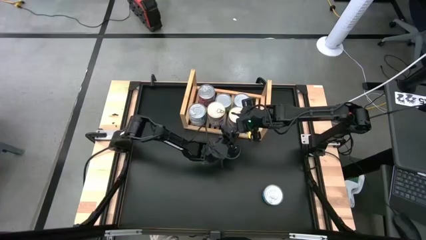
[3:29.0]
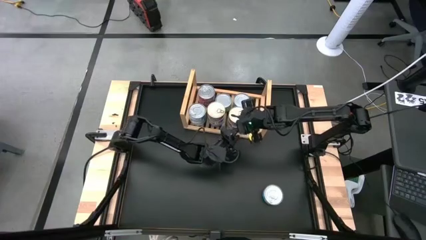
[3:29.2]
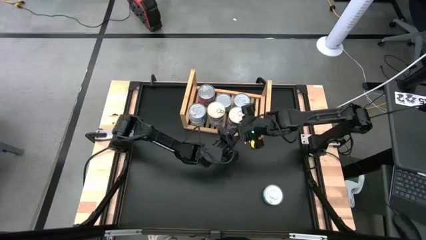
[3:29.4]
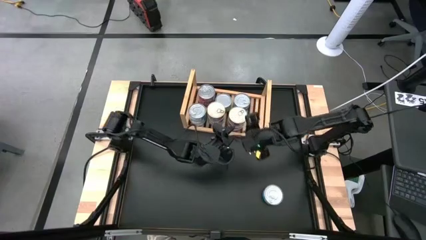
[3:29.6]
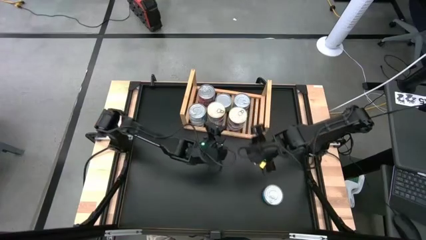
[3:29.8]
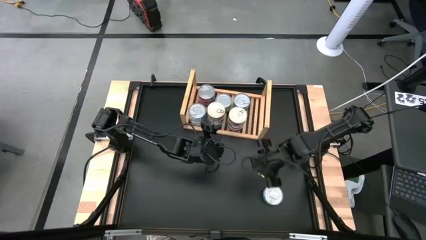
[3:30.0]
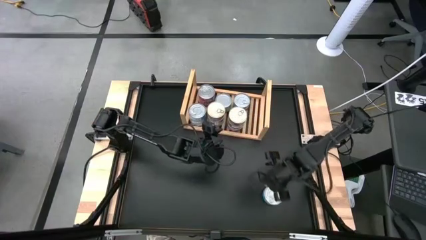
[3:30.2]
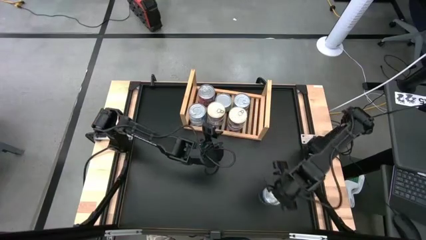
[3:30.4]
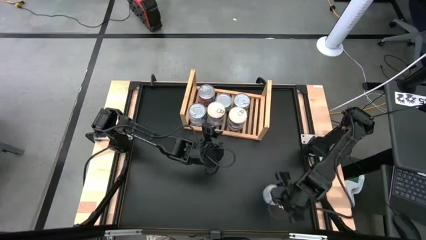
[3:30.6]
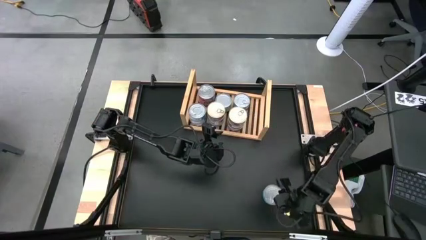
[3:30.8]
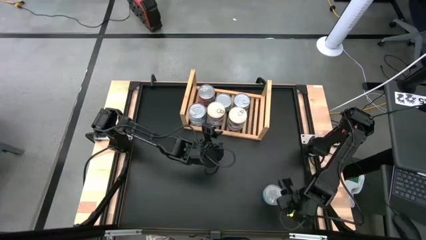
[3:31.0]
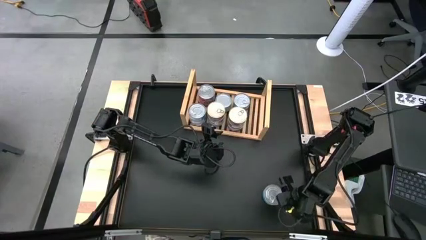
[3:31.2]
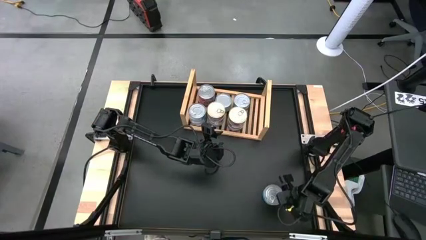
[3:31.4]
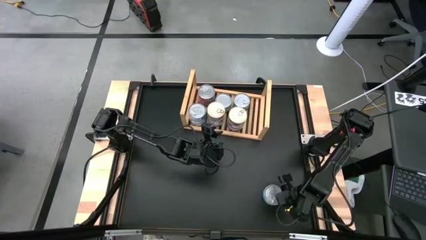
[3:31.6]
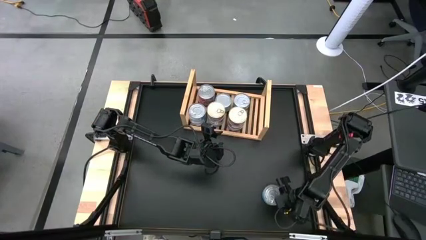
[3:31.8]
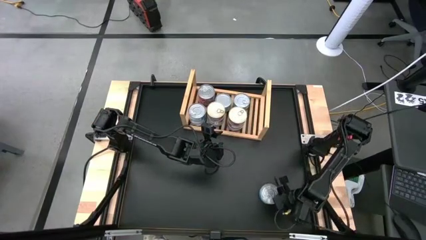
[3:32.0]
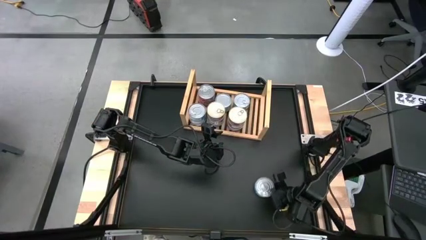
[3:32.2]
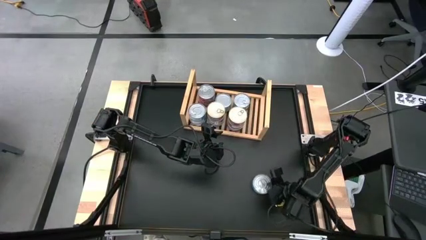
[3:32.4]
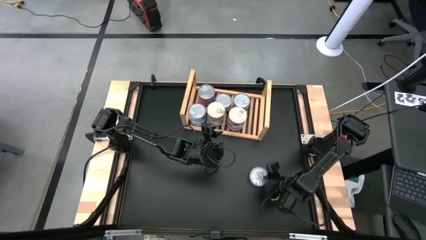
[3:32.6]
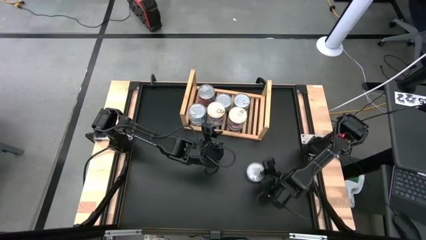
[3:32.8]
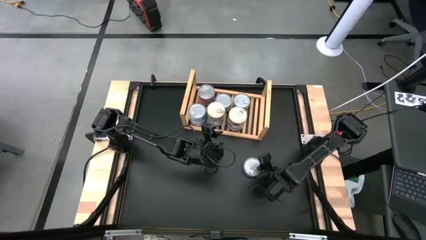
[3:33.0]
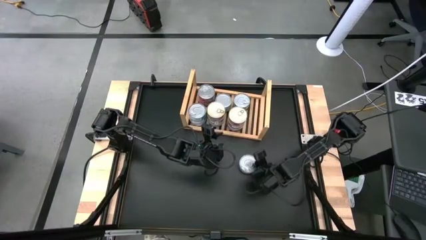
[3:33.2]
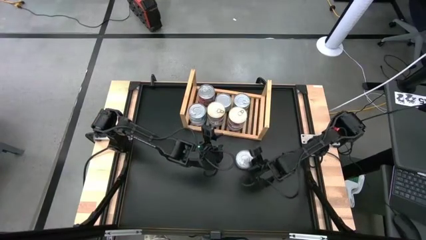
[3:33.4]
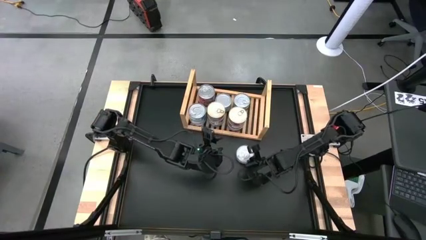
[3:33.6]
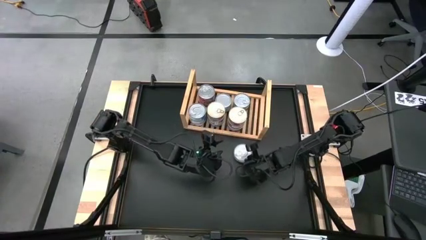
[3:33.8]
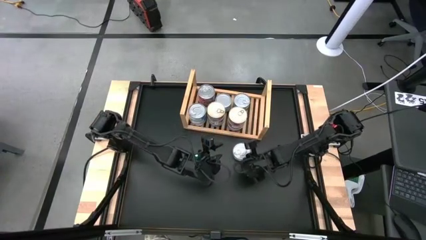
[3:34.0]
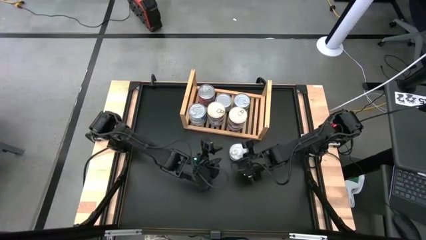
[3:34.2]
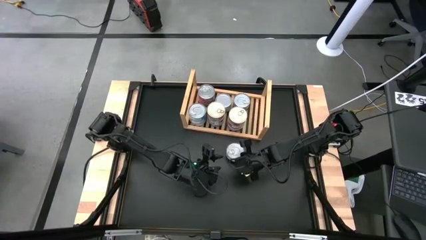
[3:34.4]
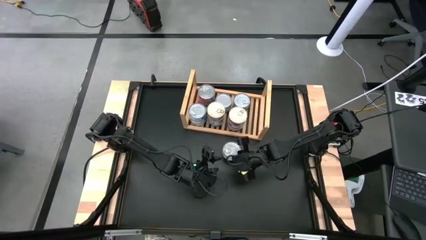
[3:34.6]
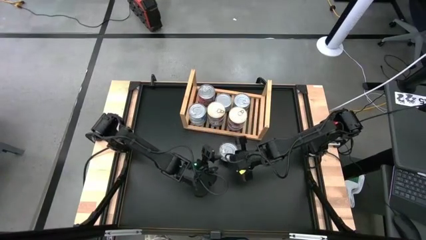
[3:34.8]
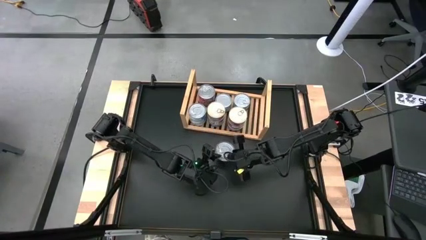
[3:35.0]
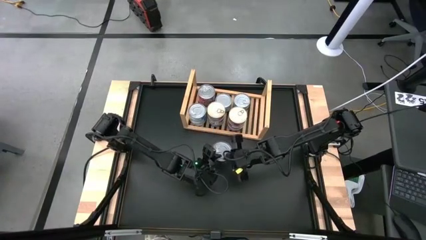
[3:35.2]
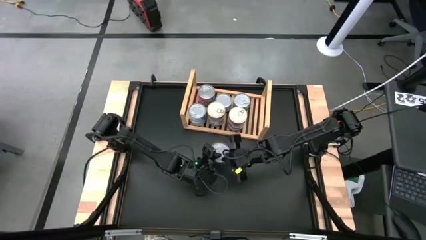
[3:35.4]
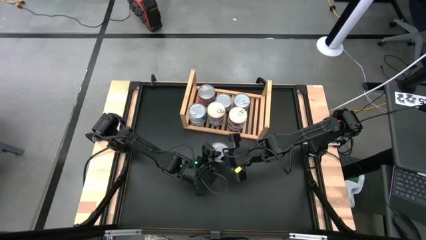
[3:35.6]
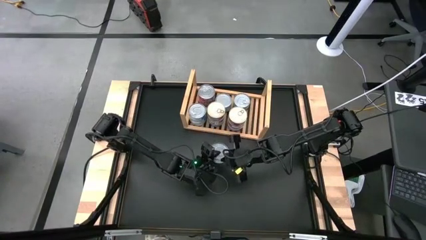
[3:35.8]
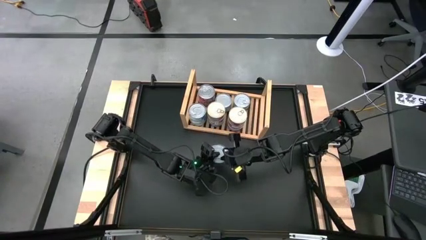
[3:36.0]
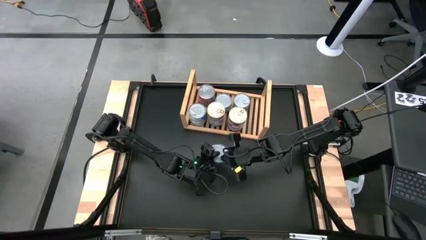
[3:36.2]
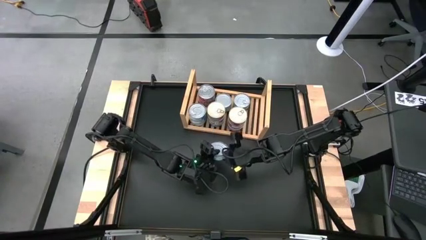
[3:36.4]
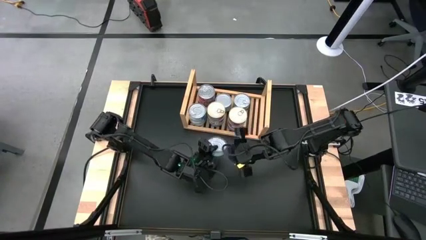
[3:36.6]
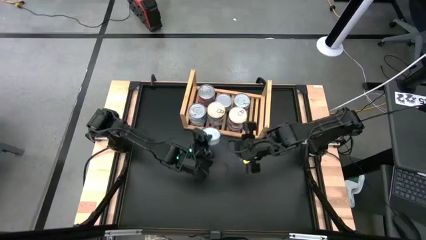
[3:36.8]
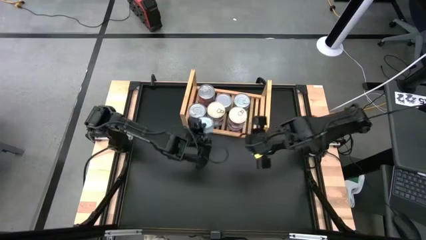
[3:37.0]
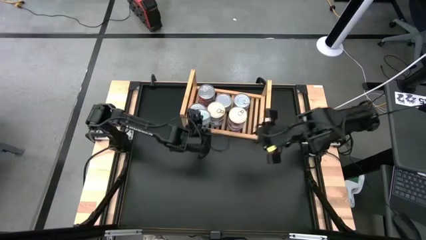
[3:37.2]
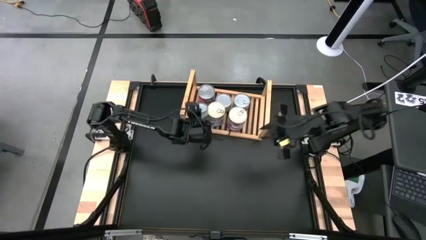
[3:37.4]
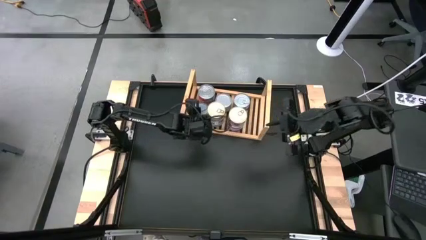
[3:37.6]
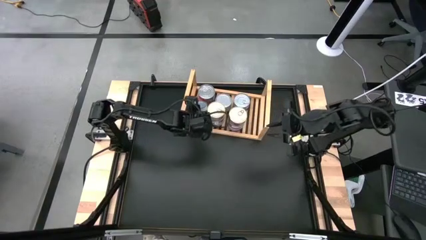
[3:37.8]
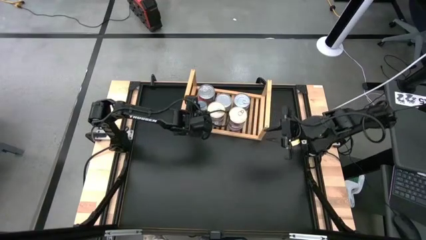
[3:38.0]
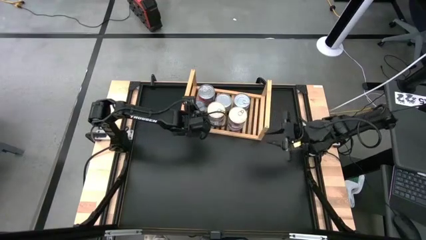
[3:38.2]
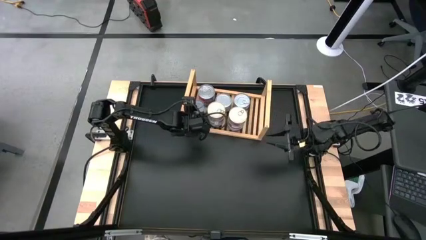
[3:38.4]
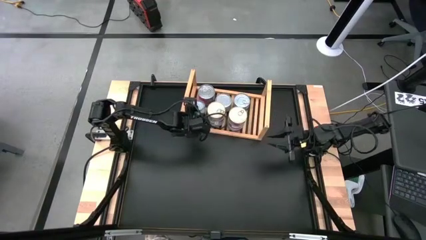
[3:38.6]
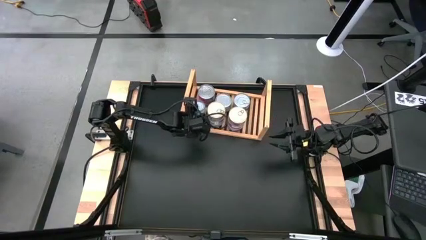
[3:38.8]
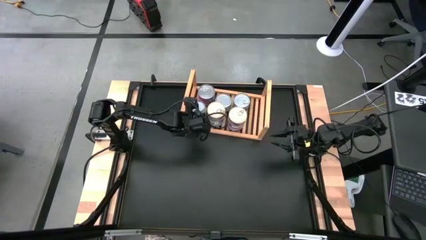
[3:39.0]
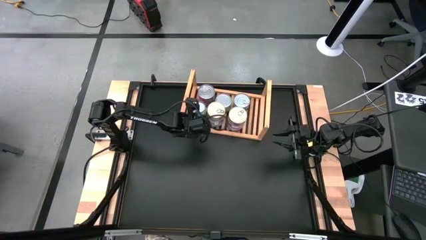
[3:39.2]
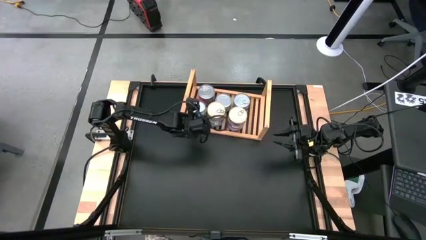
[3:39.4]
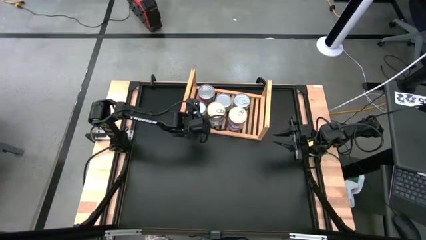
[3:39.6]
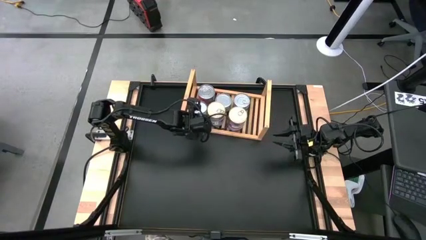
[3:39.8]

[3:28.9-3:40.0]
Task: Stack canned seafood by type on shelf
Stack the light blue tuna can on top of the other light blue tuna can

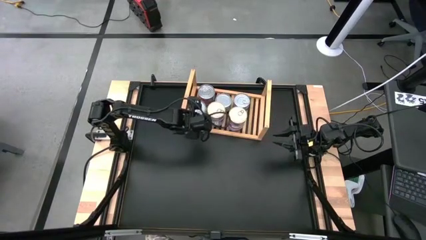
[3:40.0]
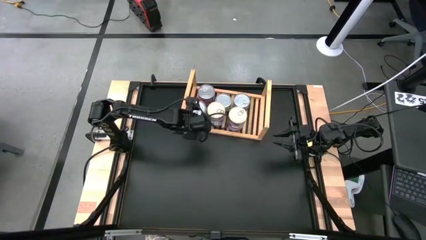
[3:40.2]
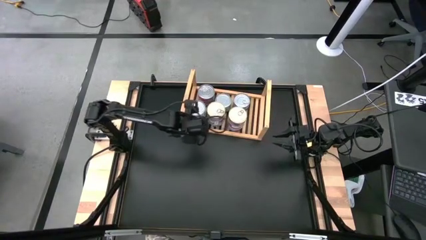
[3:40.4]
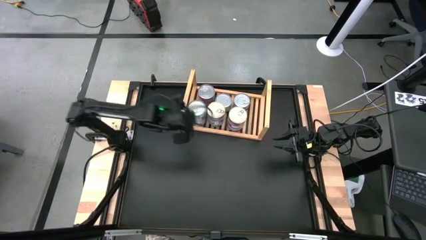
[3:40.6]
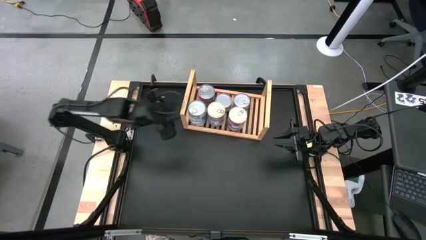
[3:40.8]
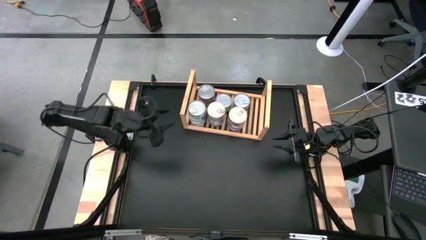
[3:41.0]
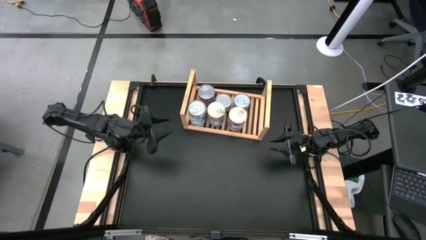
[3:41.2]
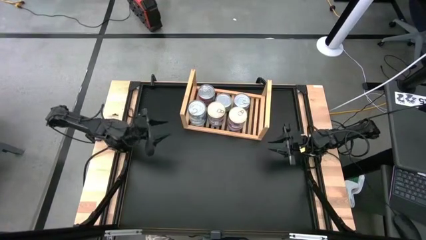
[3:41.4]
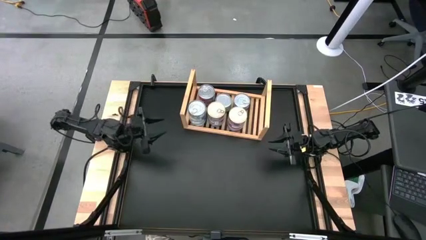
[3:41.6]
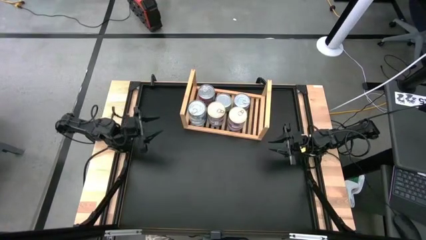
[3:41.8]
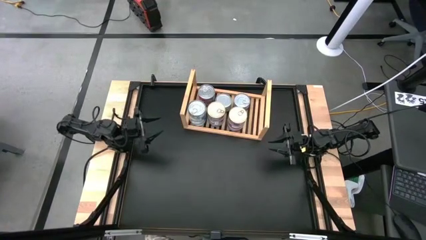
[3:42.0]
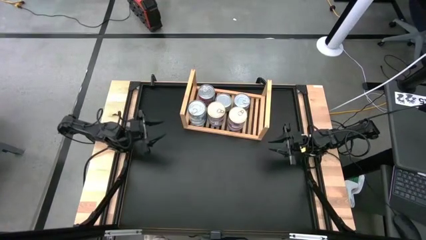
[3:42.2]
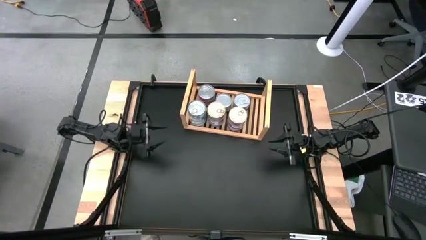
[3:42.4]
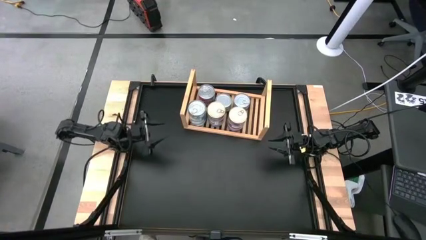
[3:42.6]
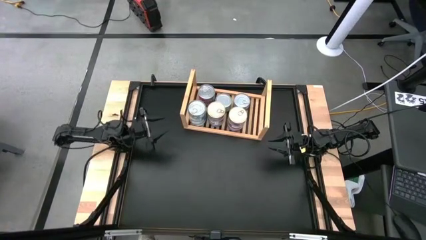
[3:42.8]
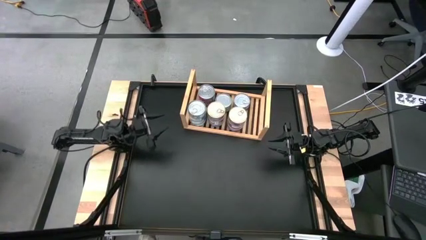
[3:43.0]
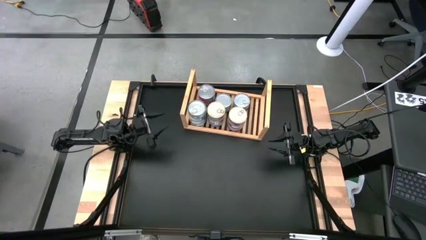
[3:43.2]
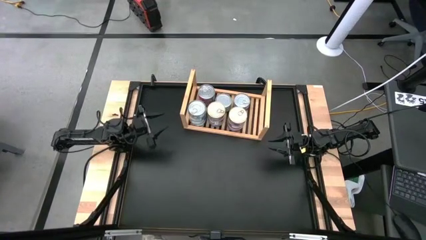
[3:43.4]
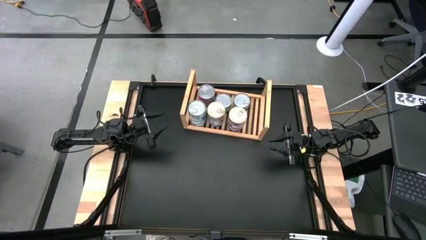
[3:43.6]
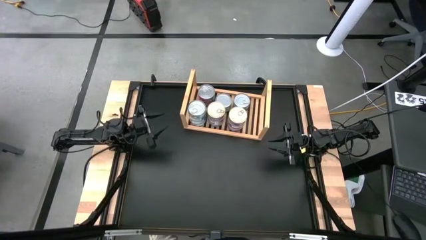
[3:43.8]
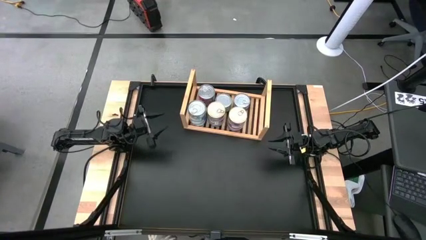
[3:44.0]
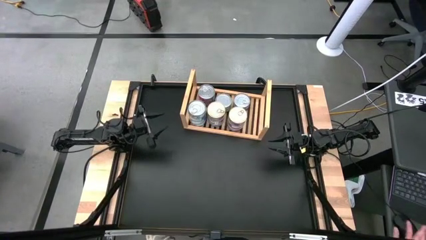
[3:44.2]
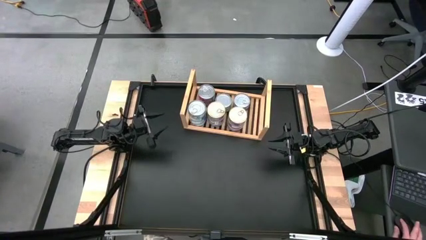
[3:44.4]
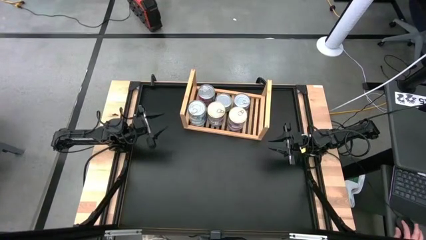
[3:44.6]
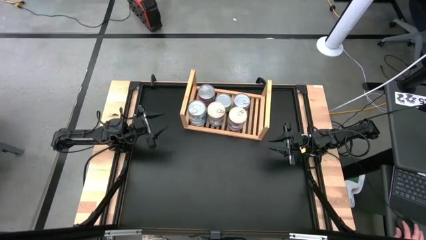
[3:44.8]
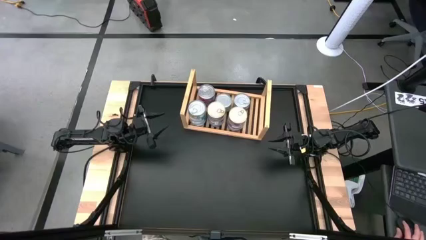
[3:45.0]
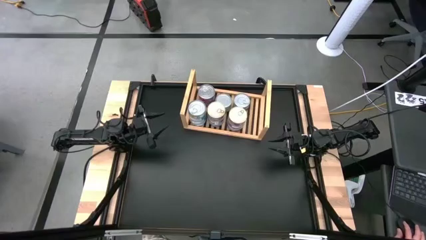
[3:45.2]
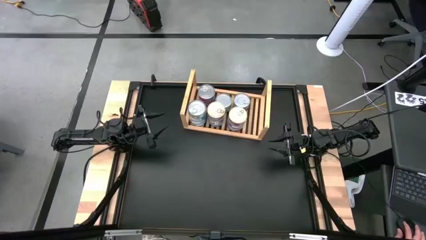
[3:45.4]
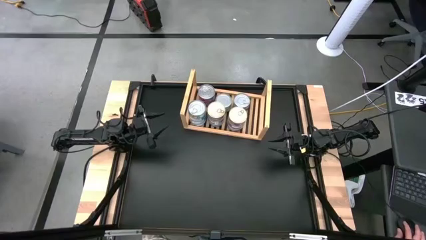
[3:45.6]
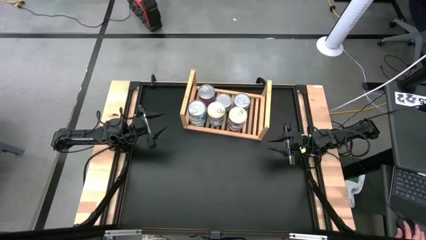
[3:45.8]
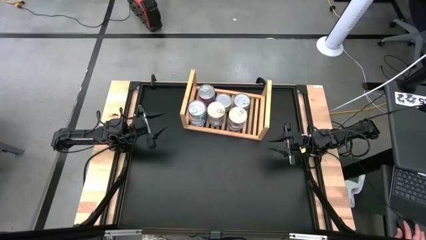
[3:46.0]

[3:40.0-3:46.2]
Return to Home Position
